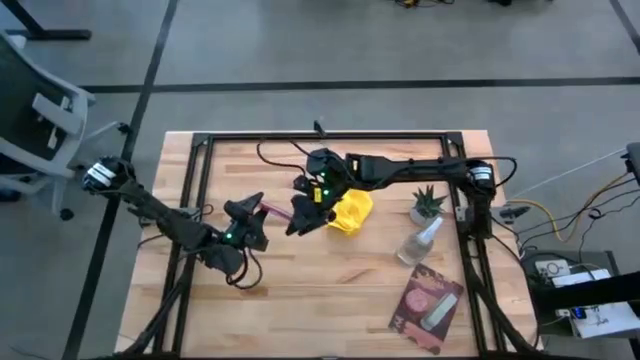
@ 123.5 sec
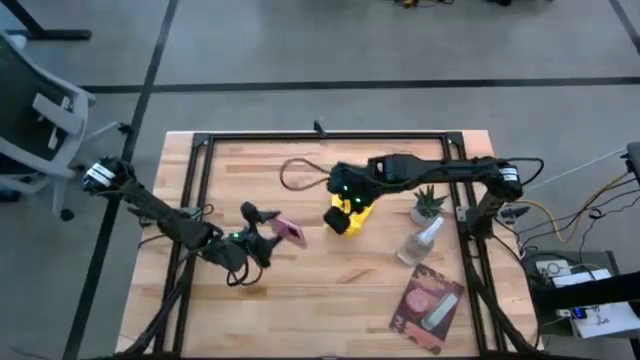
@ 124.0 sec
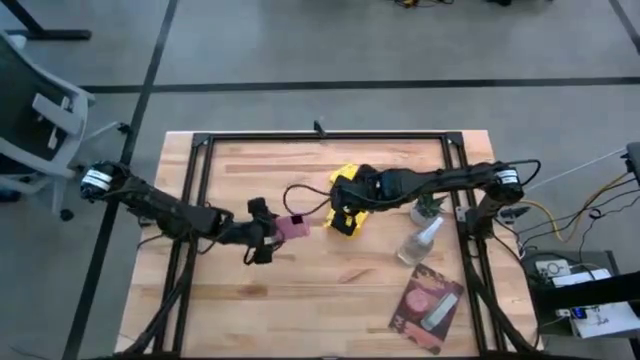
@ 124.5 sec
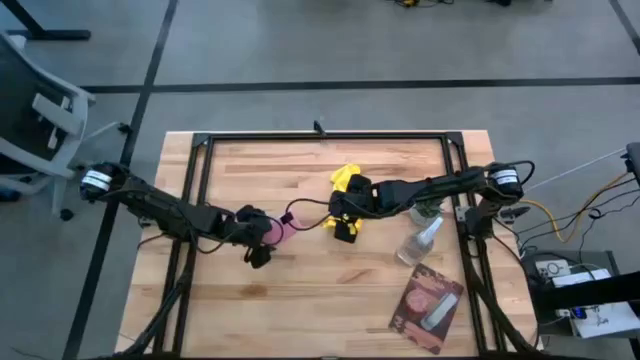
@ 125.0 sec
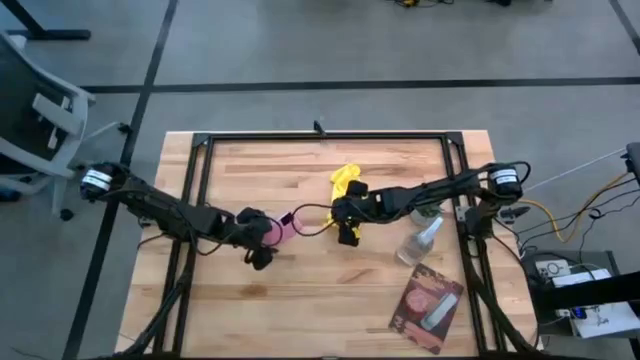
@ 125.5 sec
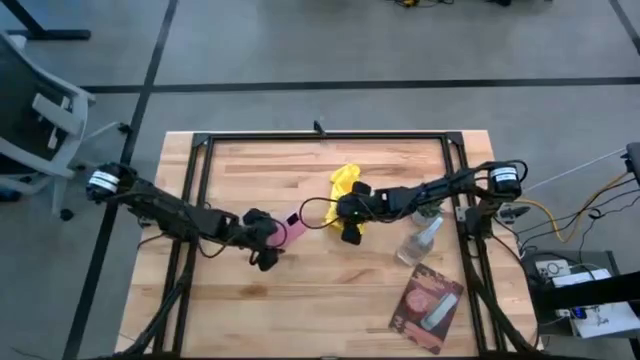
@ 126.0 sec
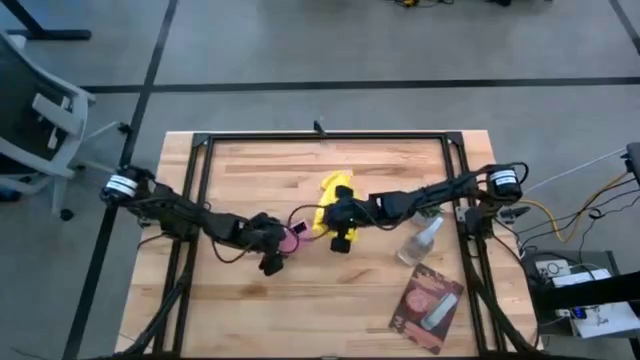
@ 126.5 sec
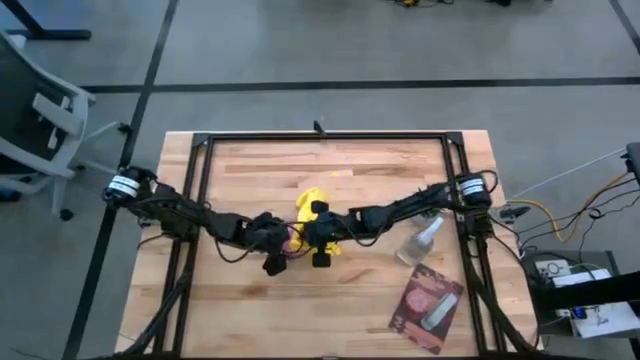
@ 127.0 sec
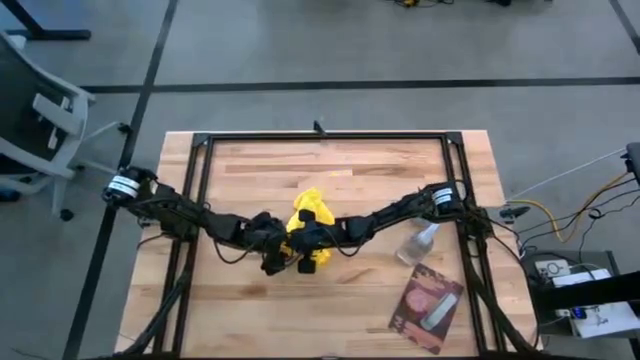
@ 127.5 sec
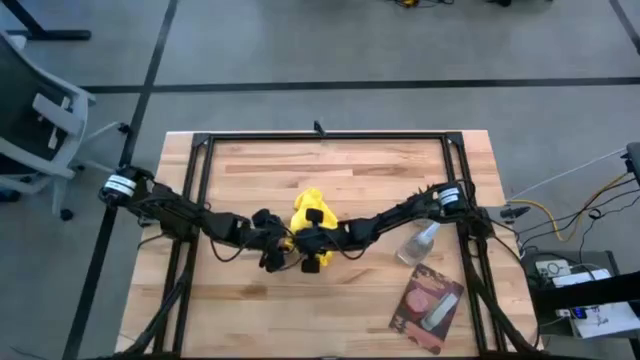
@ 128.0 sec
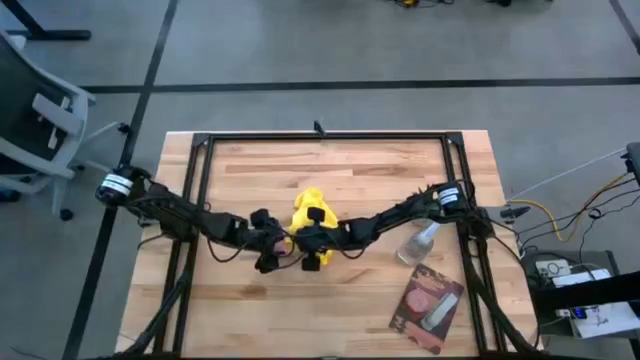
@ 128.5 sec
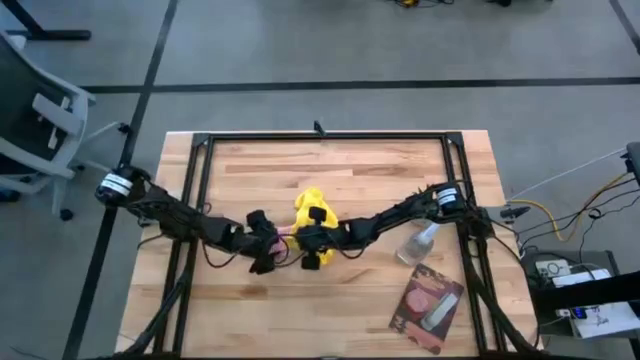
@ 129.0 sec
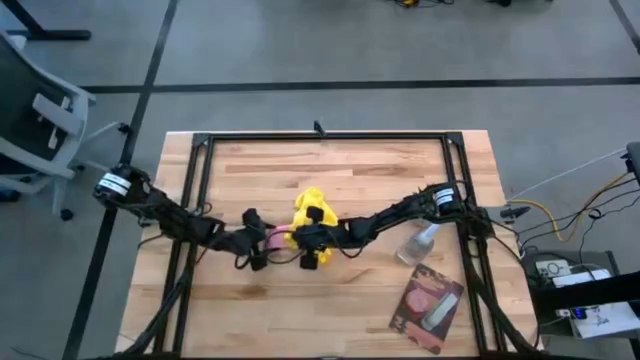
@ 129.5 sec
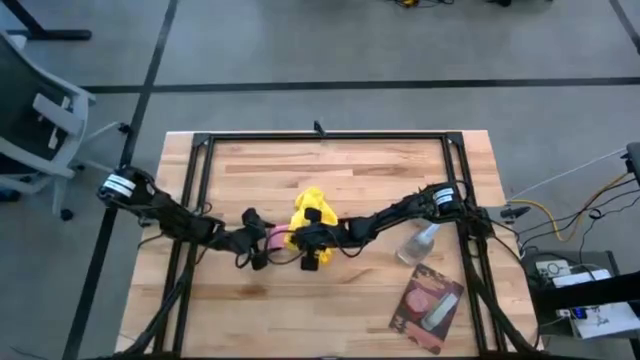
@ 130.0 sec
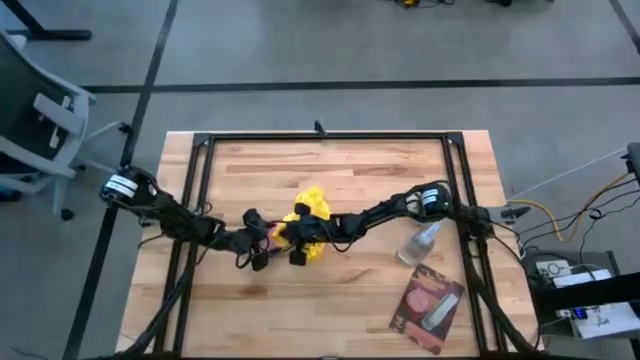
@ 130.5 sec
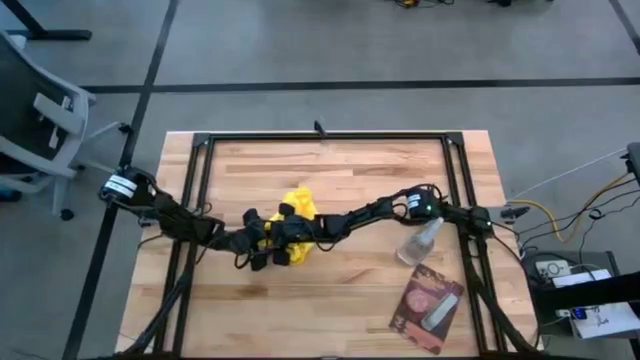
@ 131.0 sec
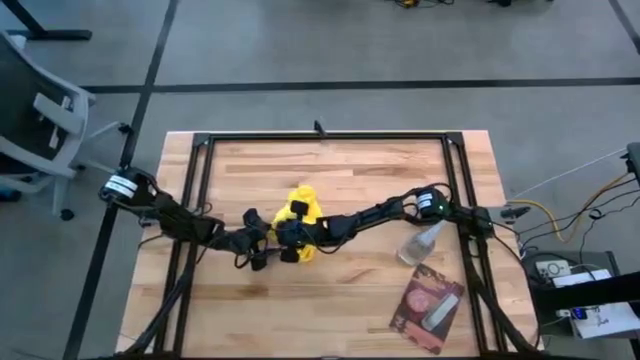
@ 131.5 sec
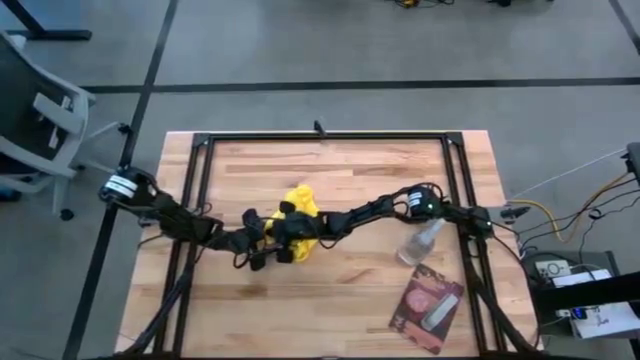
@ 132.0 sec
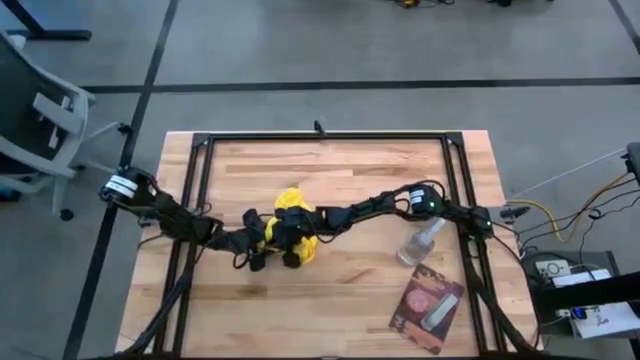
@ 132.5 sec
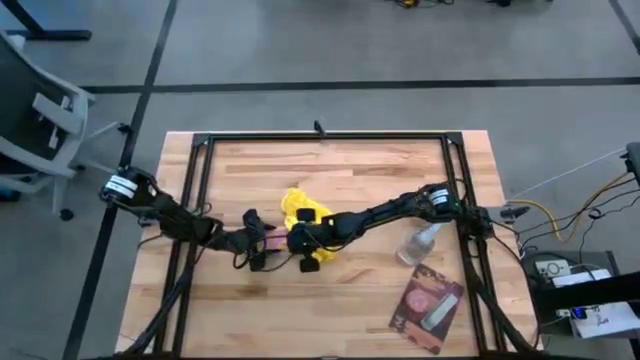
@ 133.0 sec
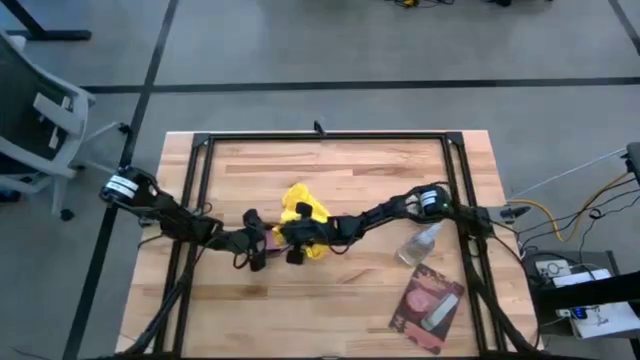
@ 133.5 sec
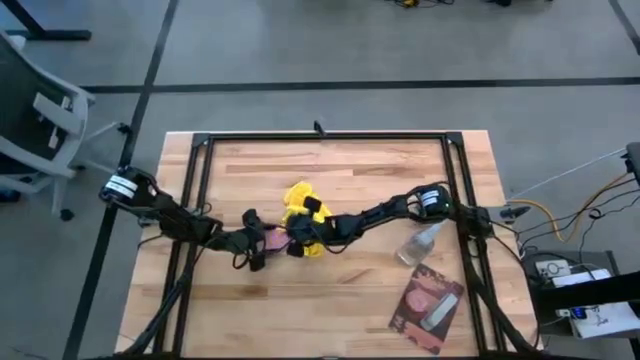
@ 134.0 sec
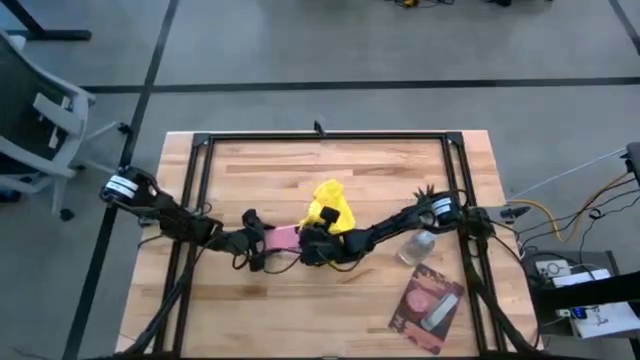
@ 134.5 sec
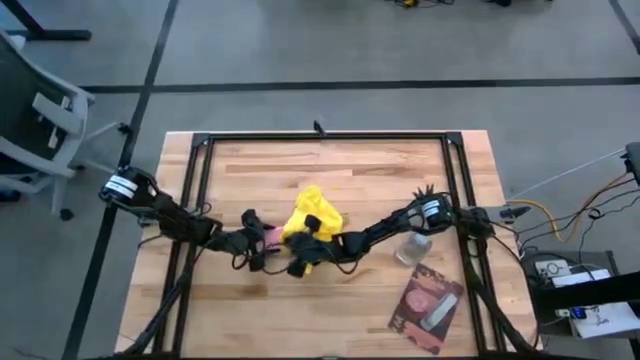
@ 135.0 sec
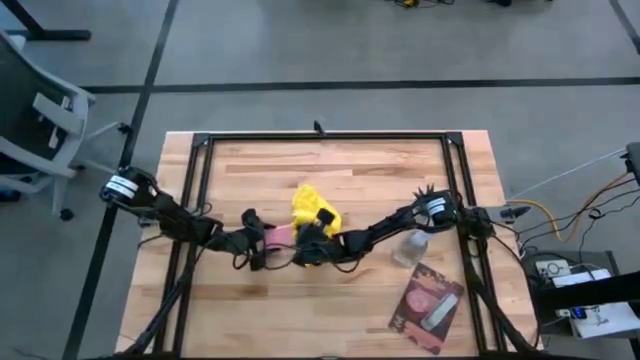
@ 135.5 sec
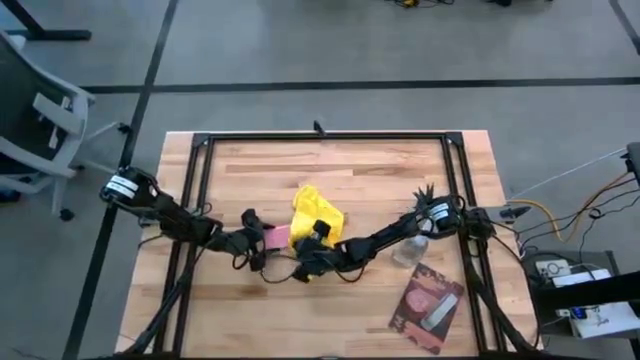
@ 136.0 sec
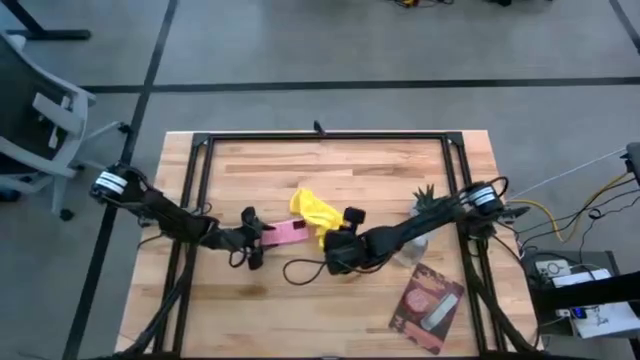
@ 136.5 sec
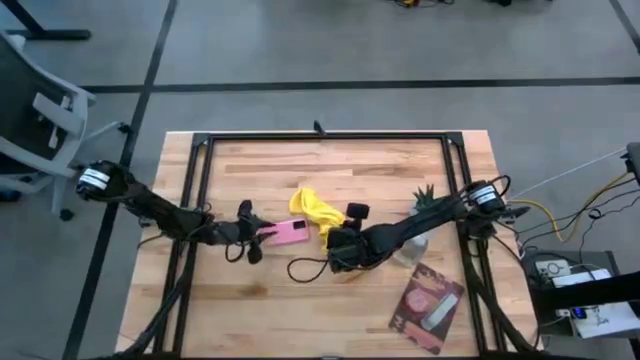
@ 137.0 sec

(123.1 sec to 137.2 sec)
Task: Apply microfiber cloth
Wipe the back of the pink cellphone with a microfiber cloth

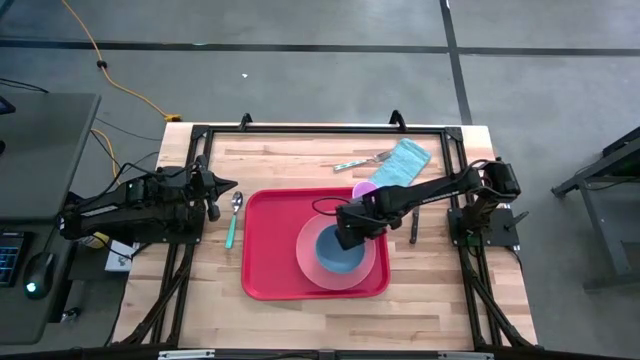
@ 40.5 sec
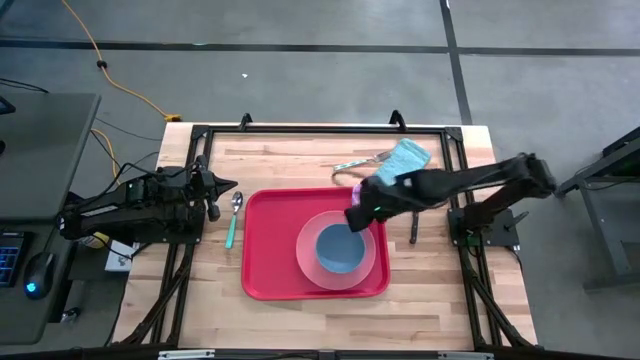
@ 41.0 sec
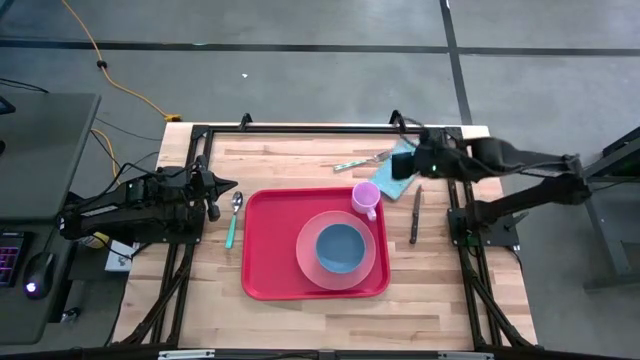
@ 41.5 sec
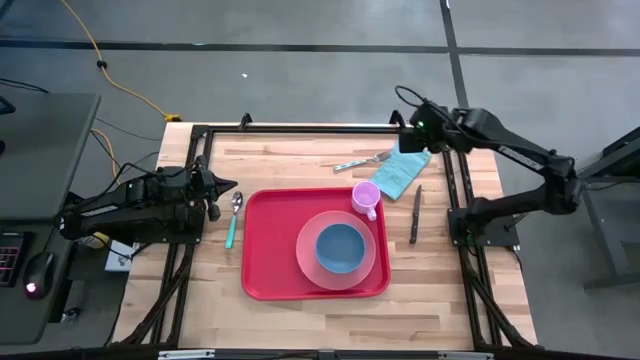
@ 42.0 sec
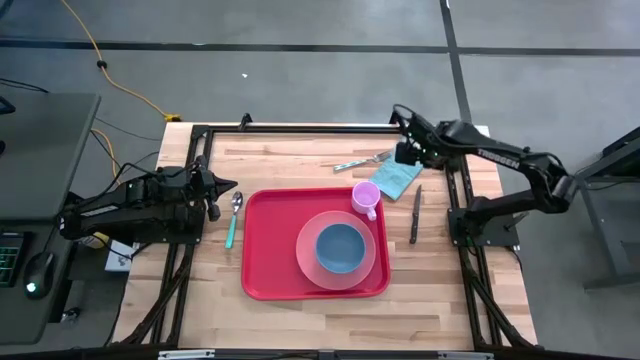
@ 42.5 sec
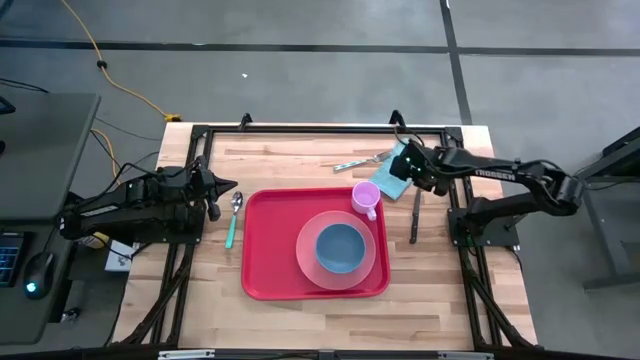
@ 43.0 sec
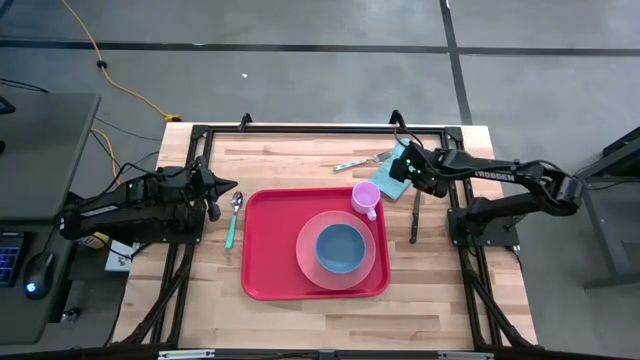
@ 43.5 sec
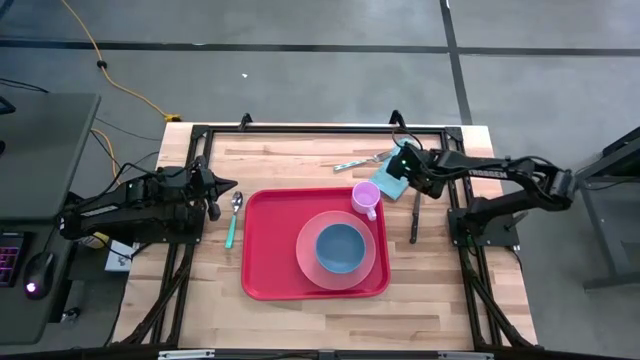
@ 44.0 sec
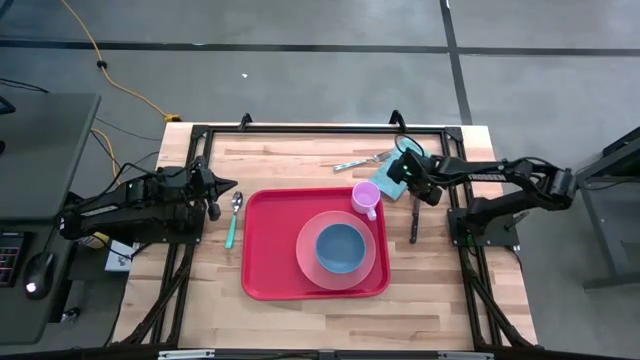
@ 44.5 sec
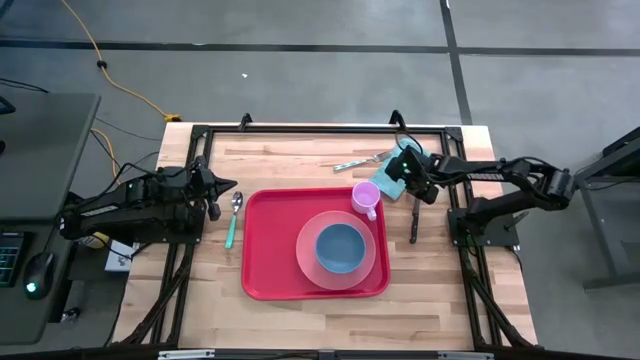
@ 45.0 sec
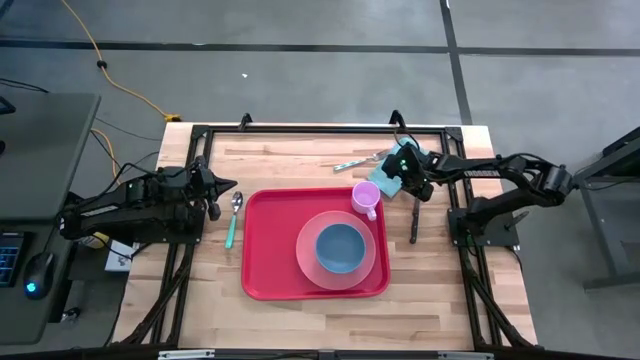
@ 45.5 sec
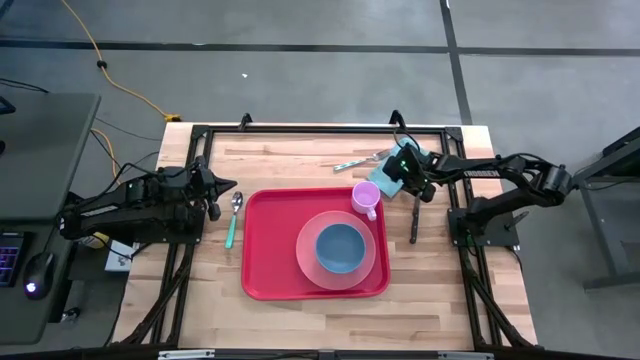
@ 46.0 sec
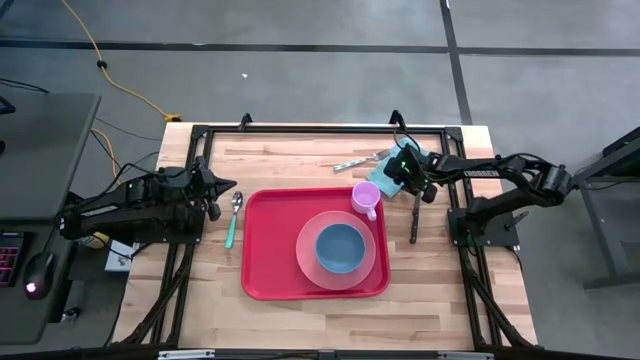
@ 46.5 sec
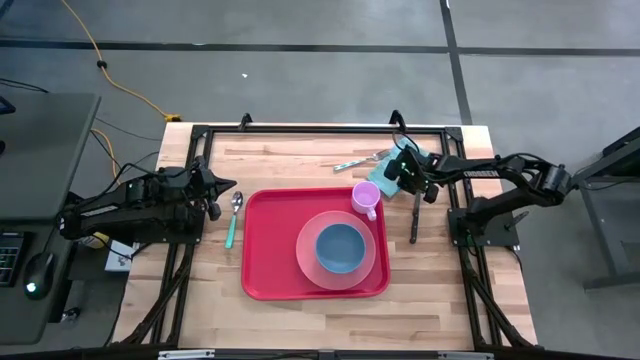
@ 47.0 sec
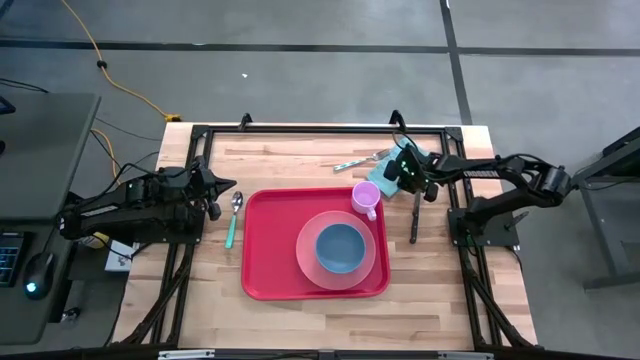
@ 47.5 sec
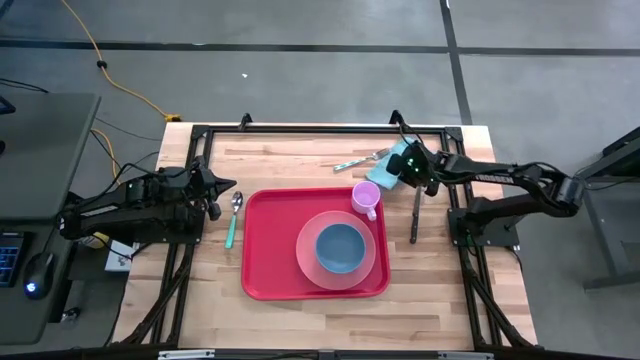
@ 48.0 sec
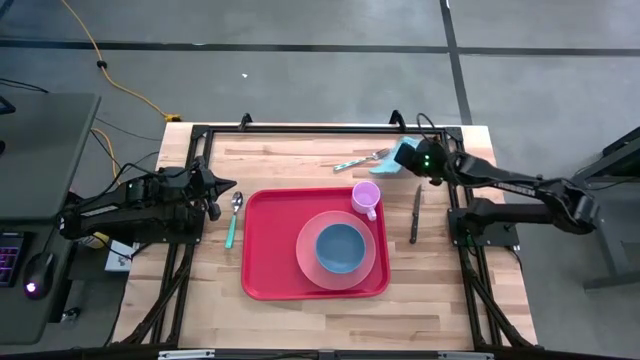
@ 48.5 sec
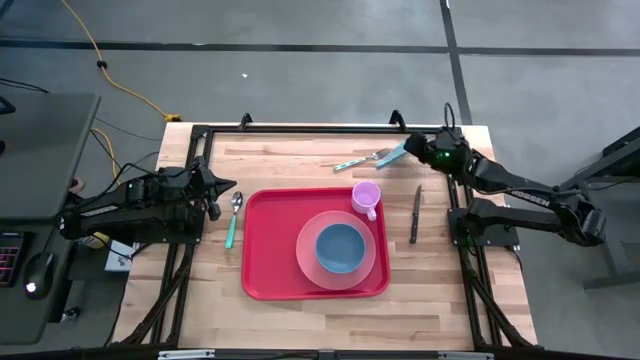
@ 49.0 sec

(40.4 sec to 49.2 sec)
Task: Set up tray
Put the blue napkin on the red serving tray to the left of the pink plate
